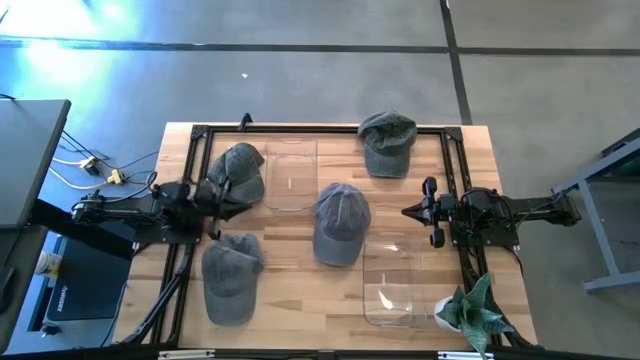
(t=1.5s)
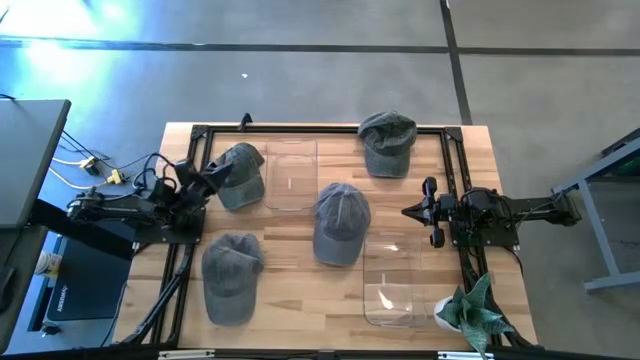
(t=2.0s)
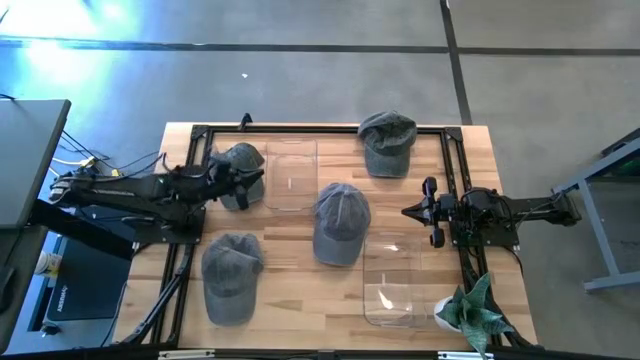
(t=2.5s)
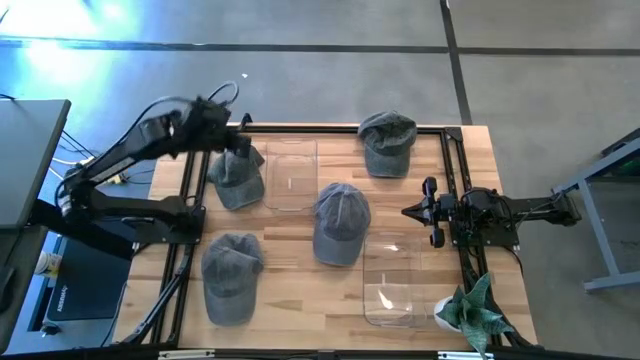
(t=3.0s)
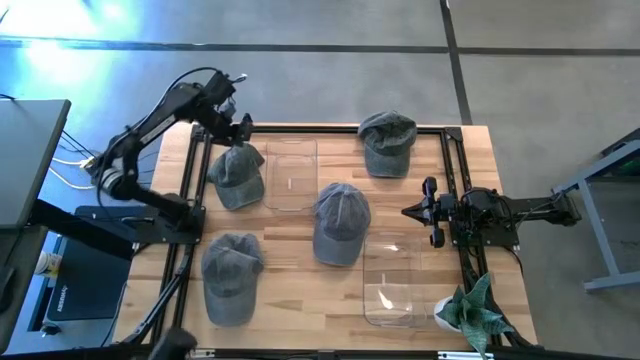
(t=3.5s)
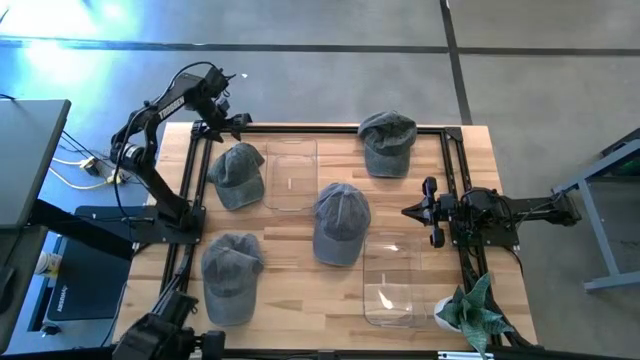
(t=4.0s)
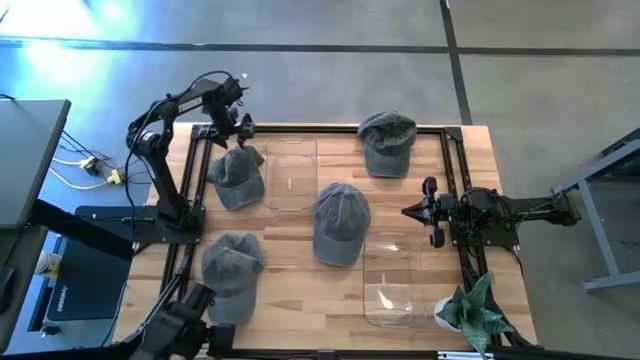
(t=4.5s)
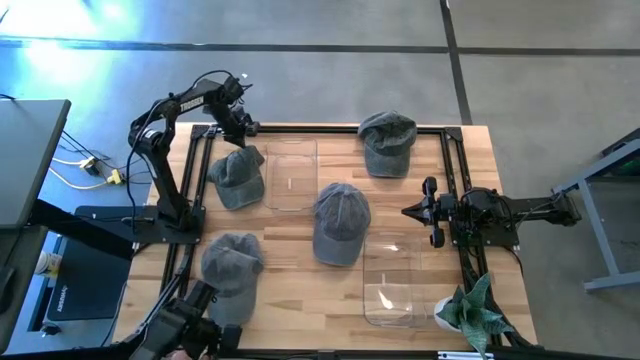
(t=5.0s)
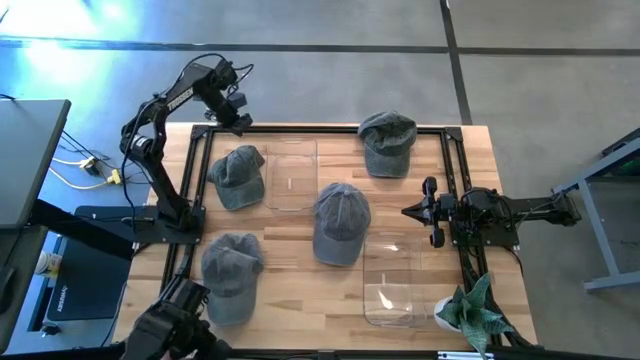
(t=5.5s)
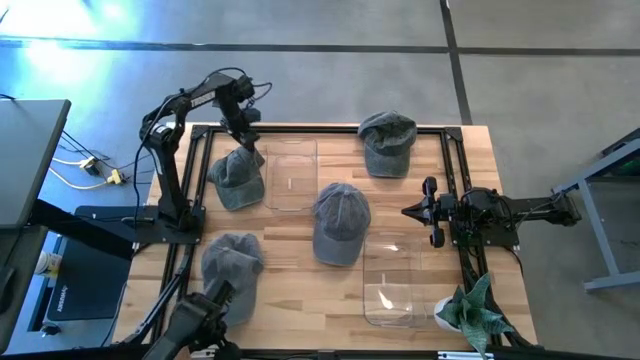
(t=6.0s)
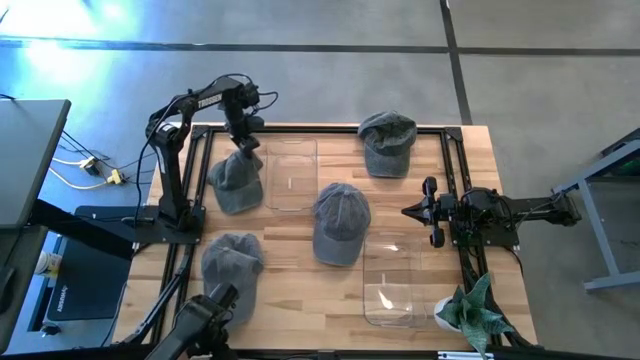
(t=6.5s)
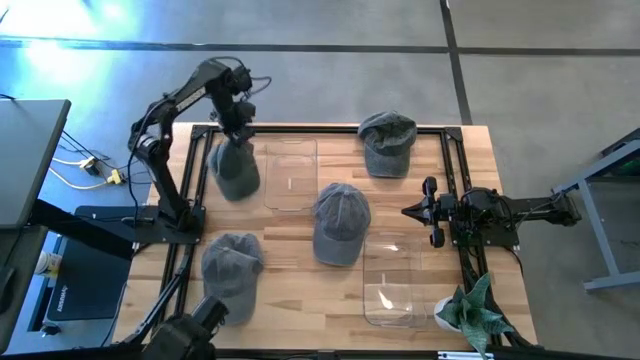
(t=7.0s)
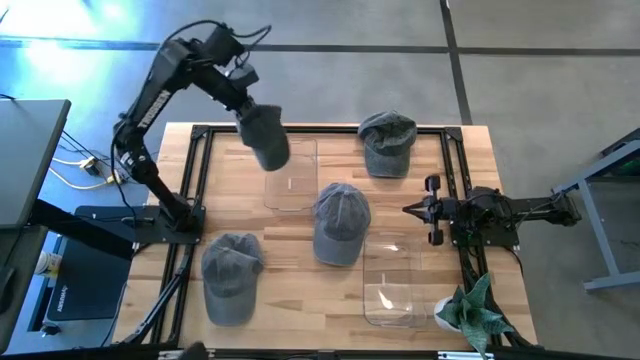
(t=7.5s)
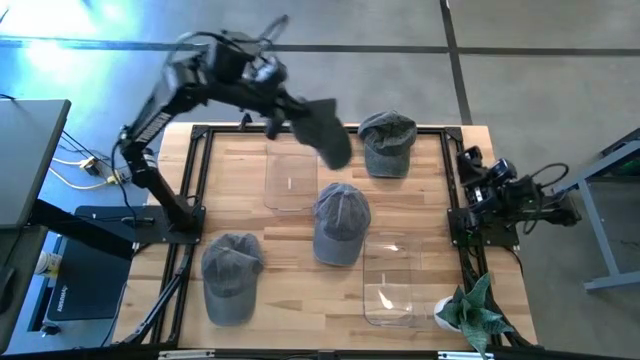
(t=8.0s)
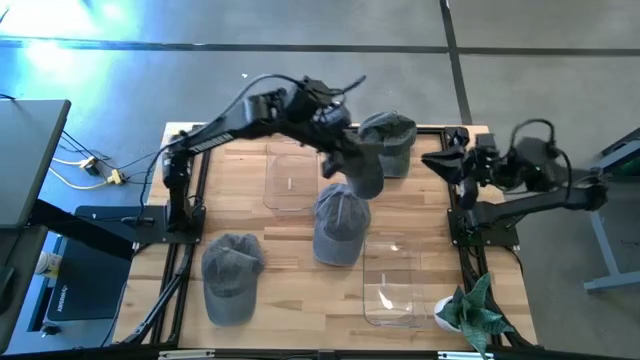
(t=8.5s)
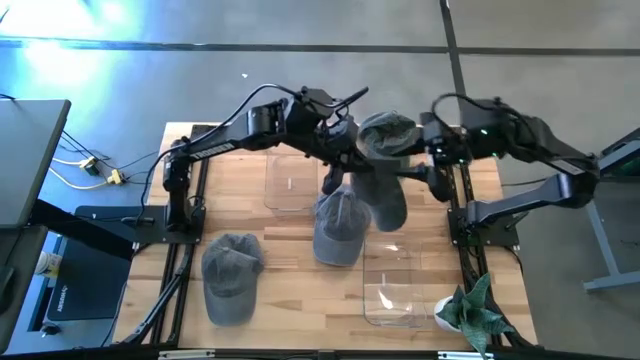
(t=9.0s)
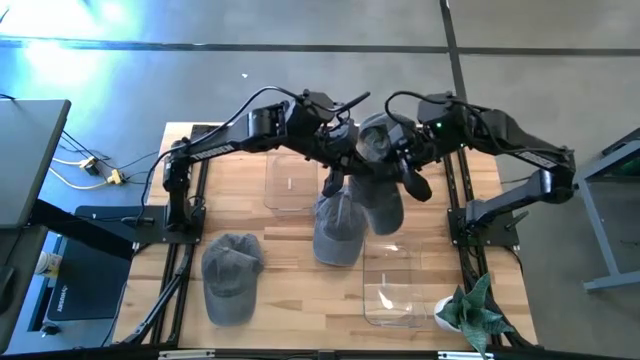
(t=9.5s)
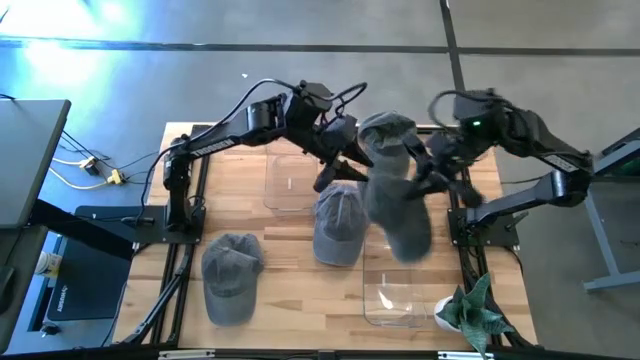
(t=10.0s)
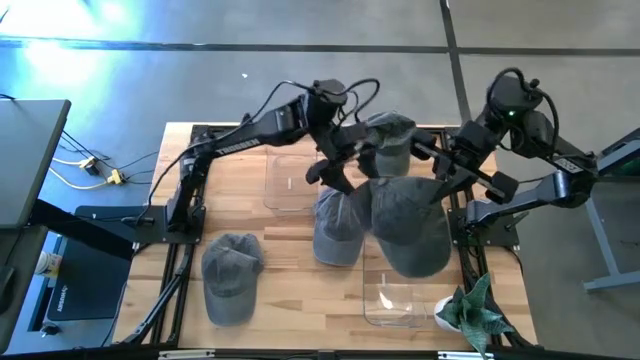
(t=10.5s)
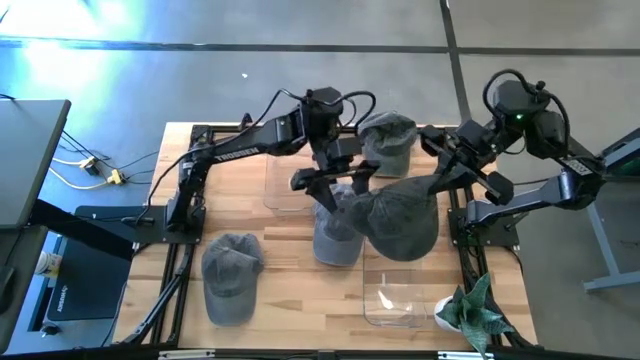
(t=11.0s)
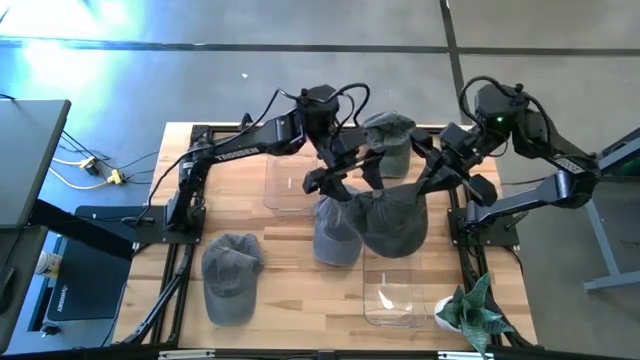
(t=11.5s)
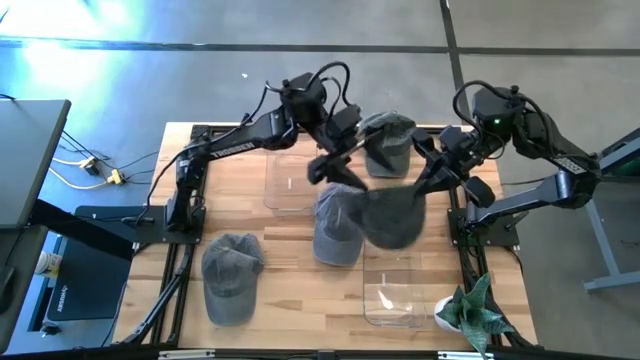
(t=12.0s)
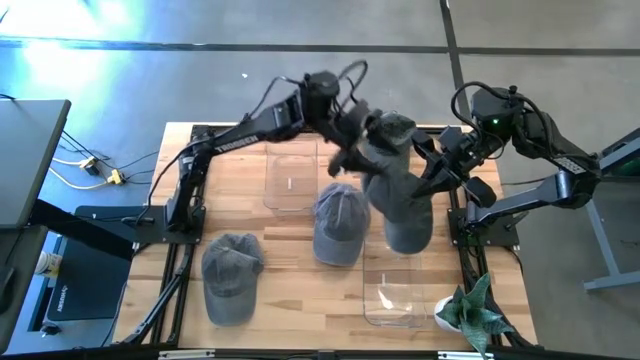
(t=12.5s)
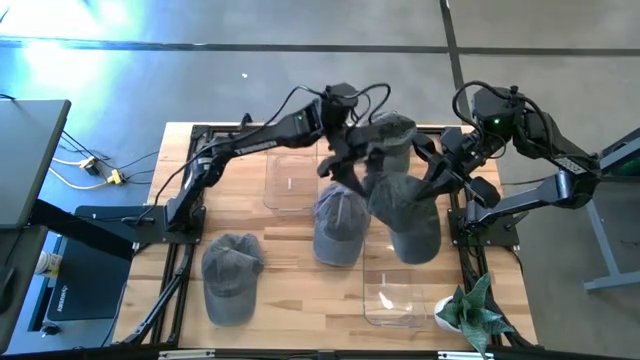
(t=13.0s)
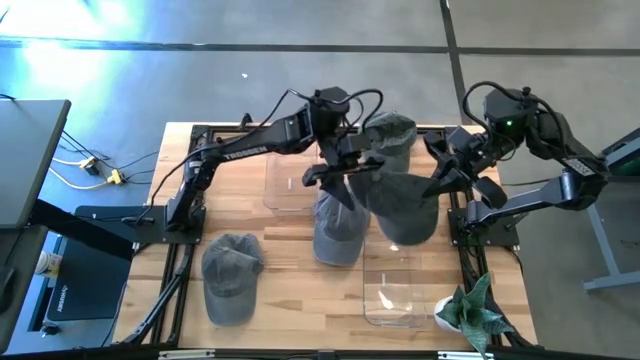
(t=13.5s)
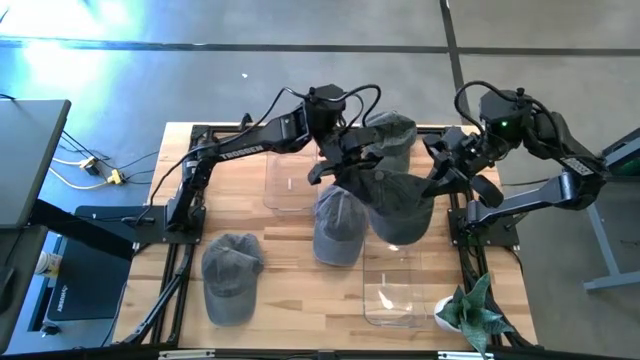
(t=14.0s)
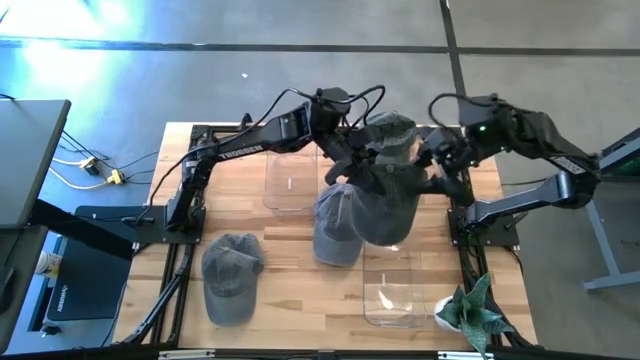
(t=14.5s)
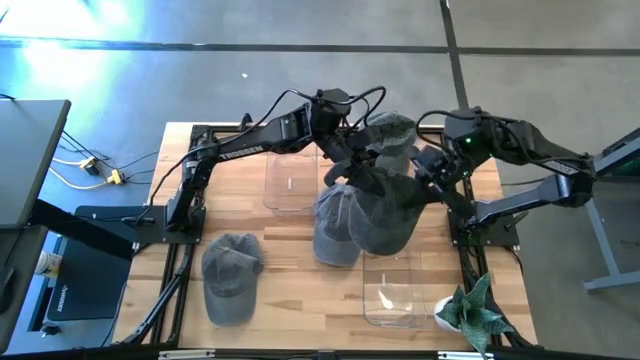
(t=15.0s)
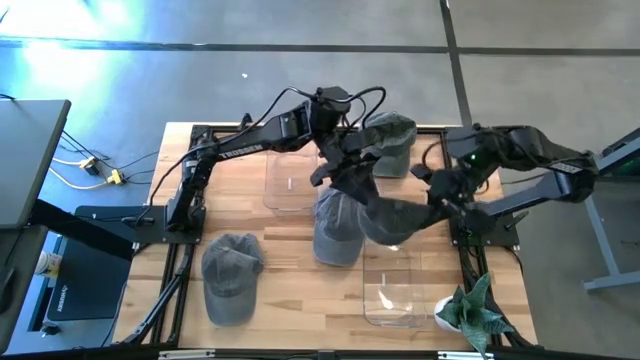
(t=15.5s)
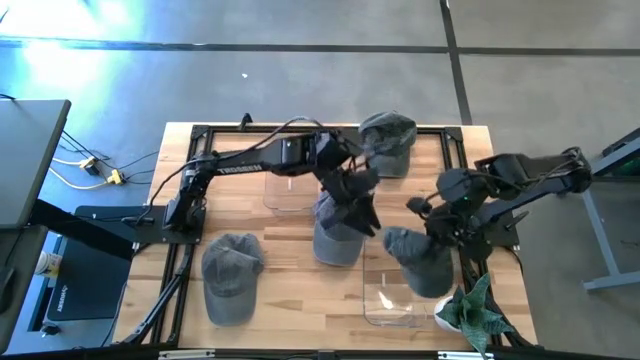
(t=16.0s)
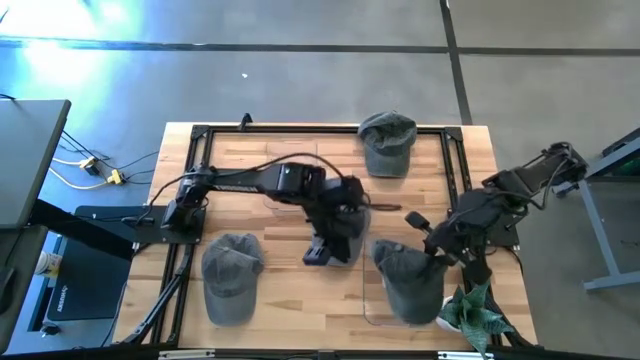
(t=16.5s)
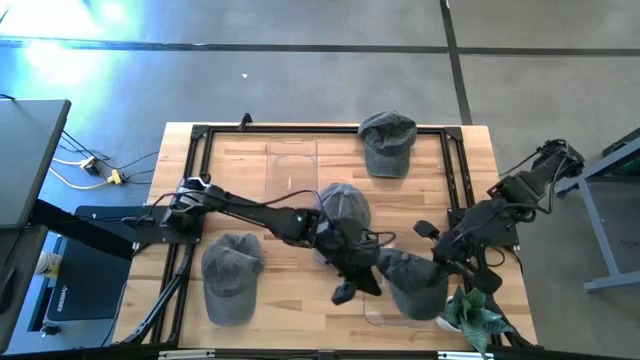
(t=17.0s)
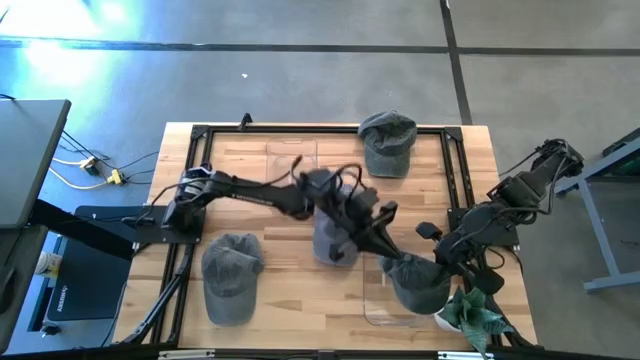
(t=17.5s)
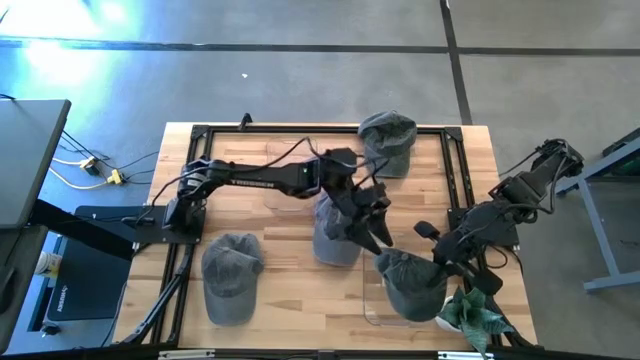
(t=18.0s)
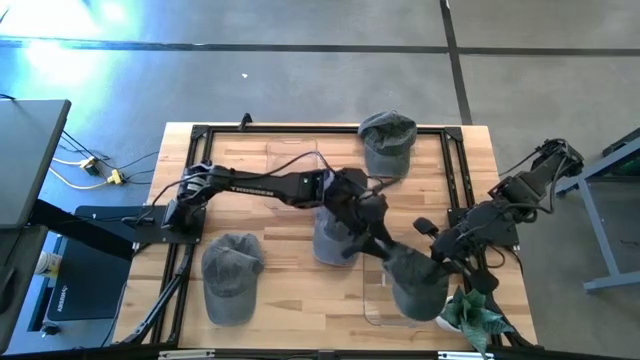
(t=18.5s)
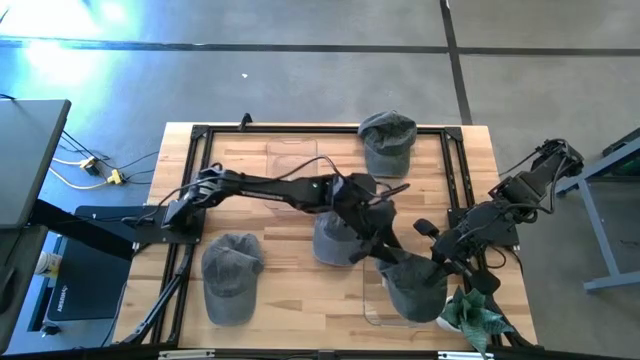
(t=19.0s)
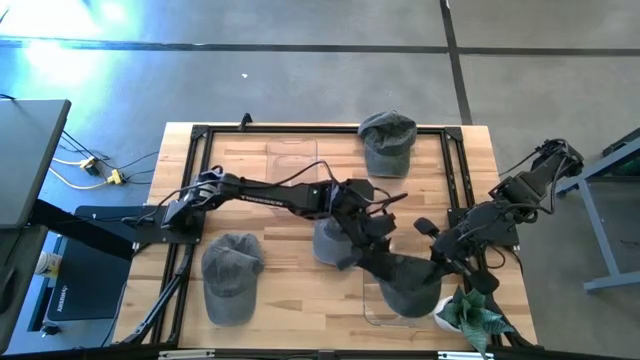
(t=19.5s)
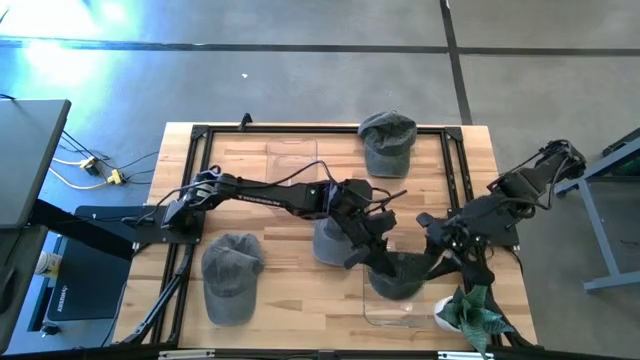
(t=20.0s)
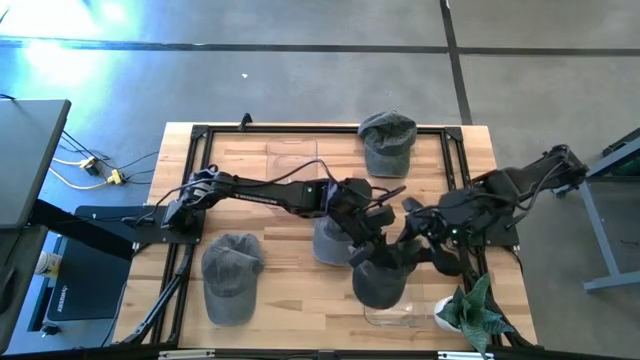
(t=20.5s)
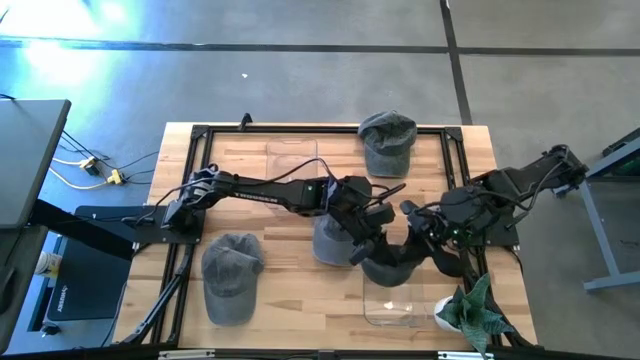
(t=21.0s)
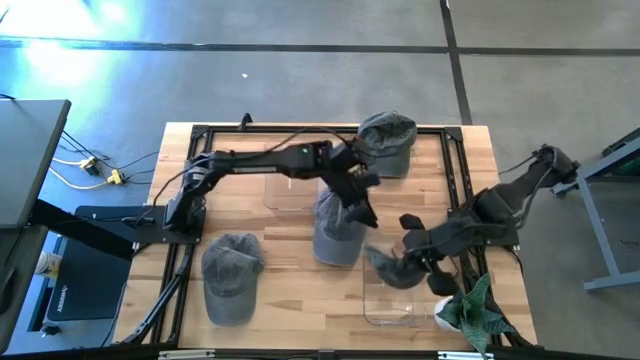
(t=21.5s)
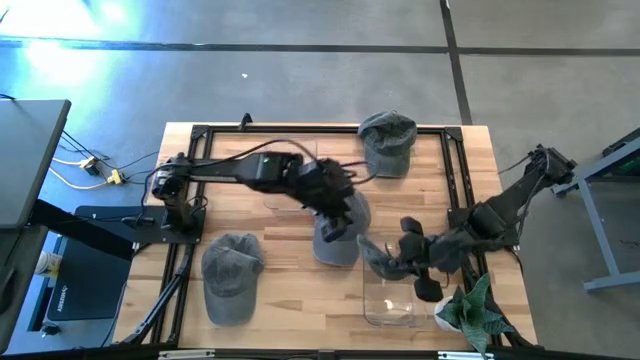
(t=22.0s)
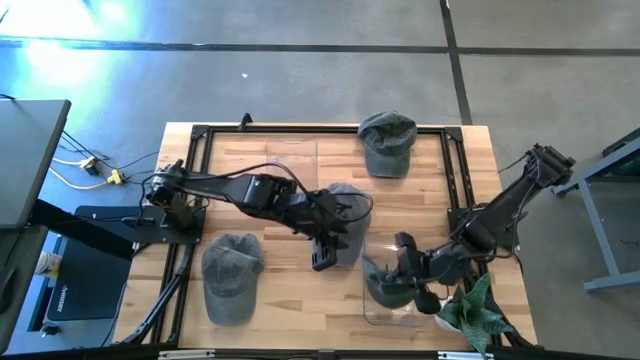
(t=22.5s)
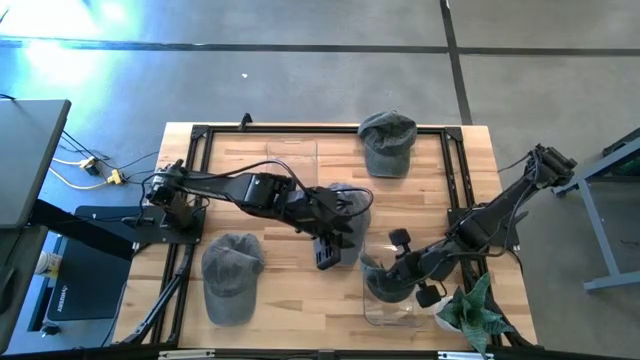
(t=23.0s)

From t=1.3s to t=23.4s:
Task: Pick & Place hat
Put the left dark gray cap into the bottom transparent bin
